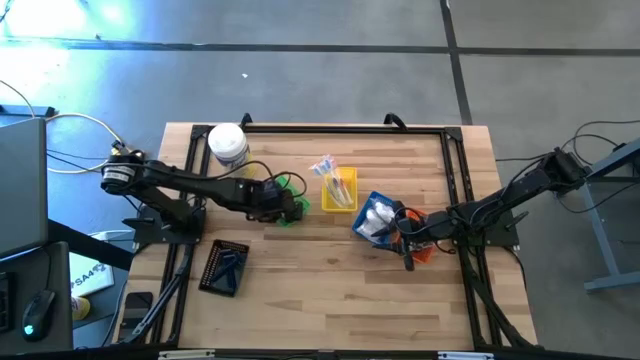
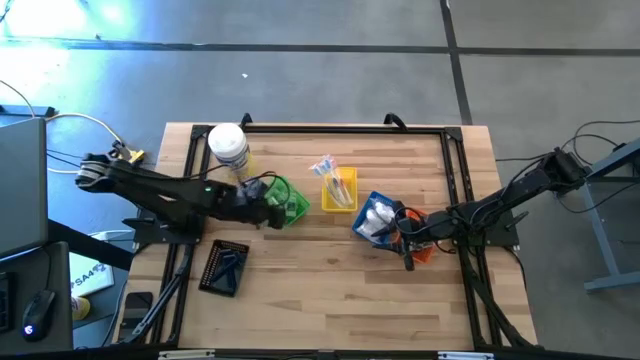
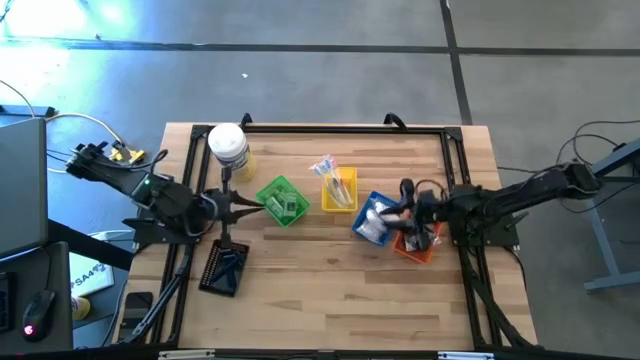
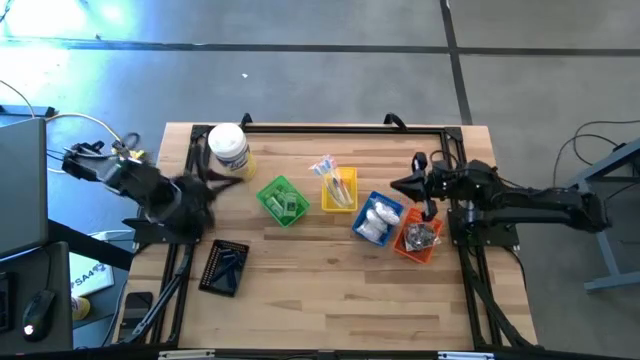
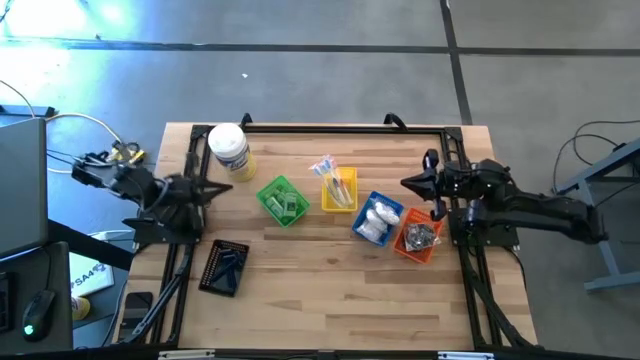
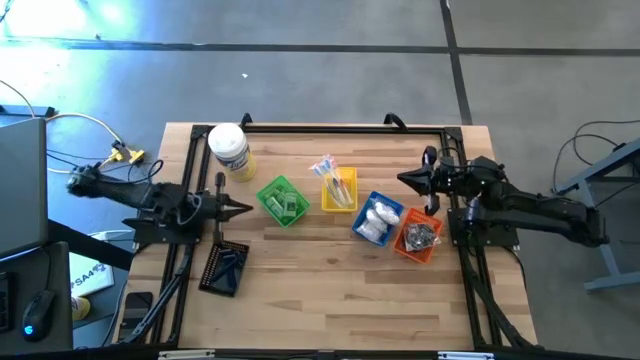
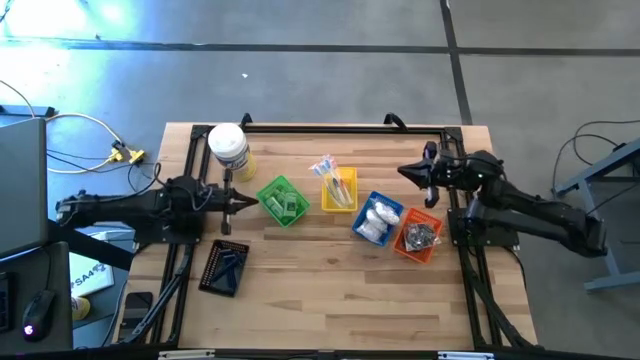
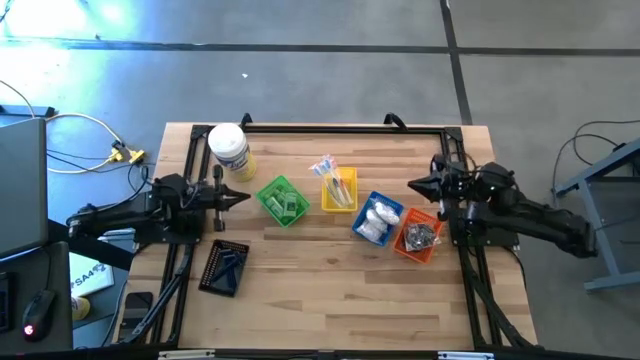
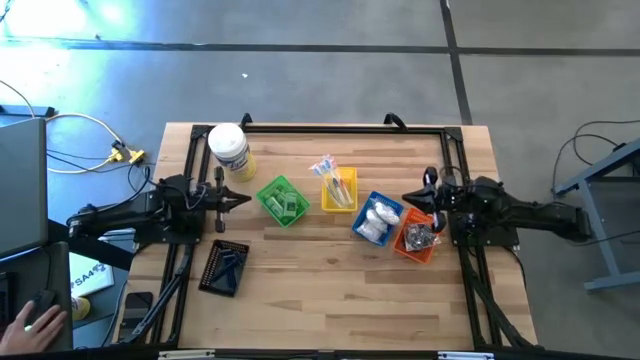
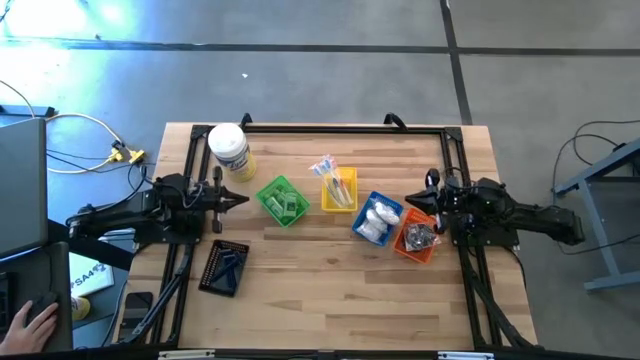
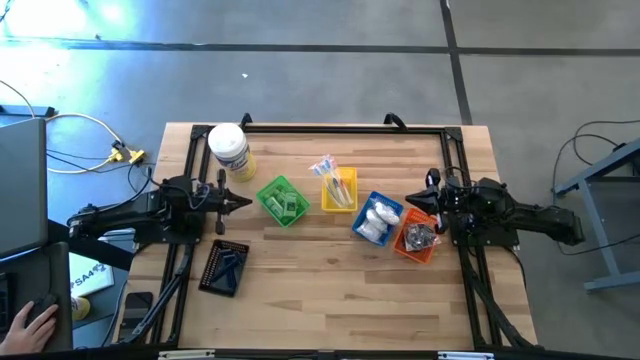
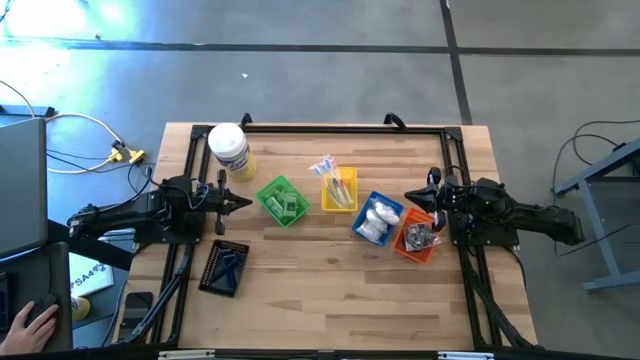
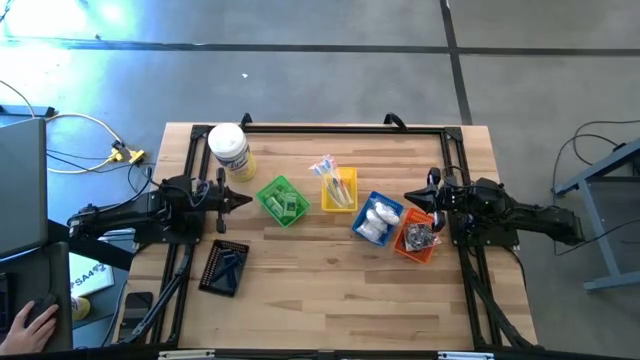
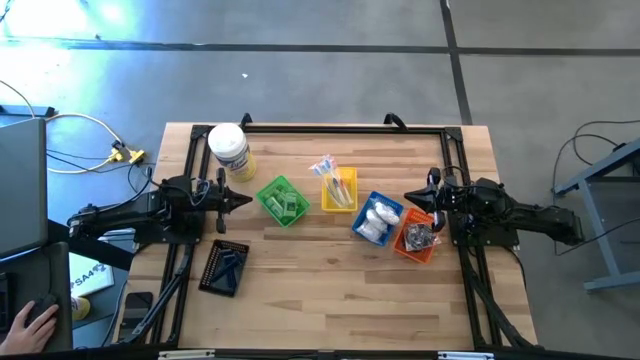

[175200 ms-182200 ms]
Task: Pick & Place Travel size toiletries
Return to Home Position

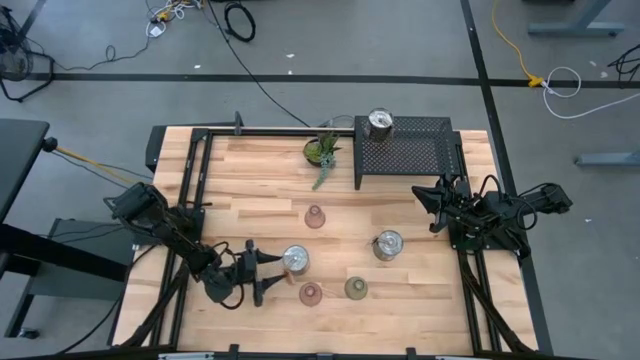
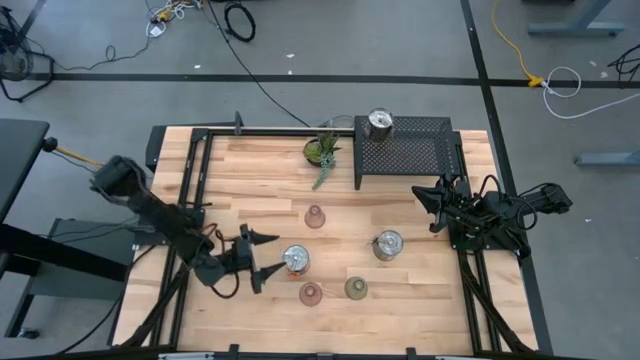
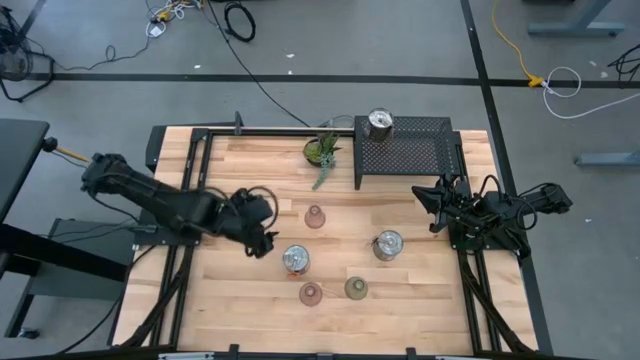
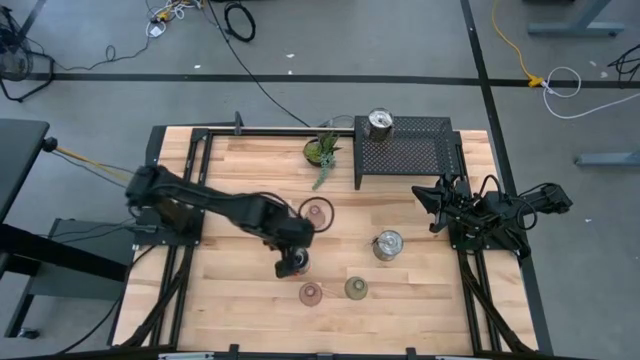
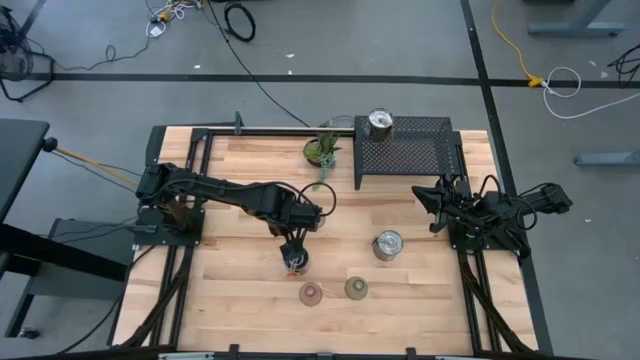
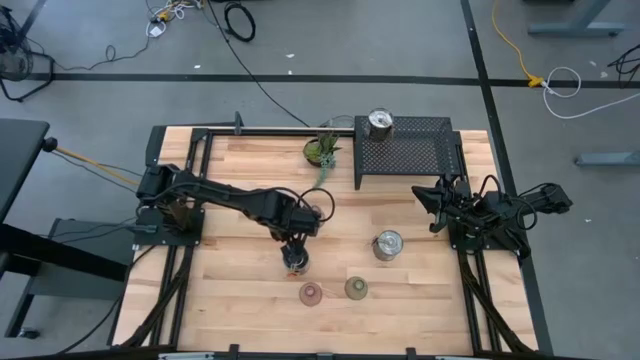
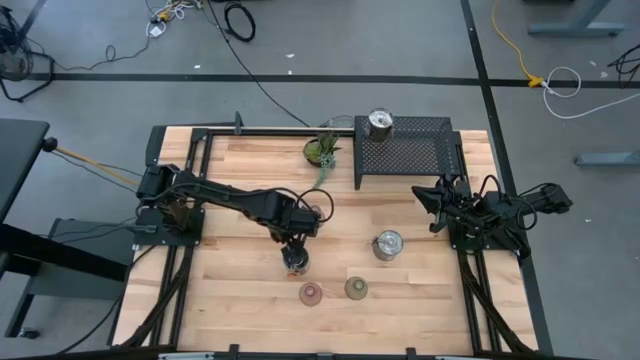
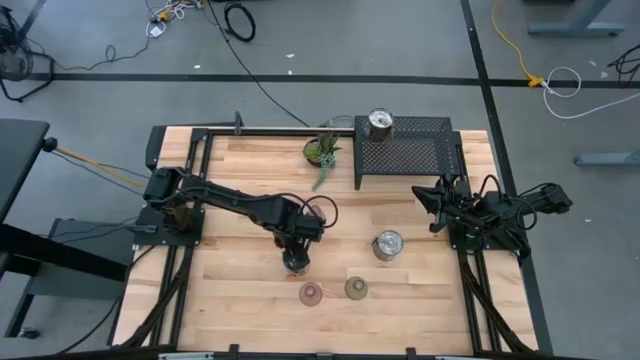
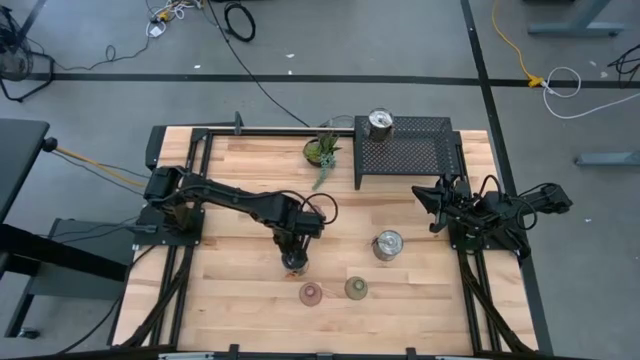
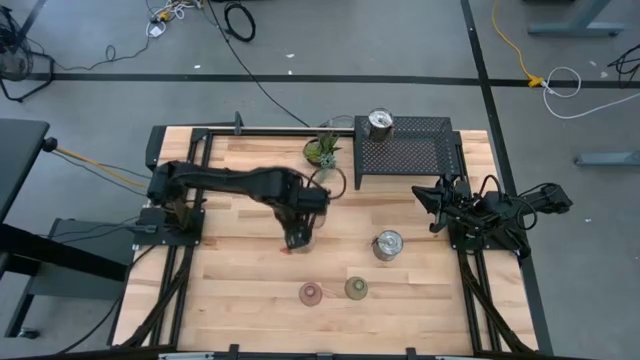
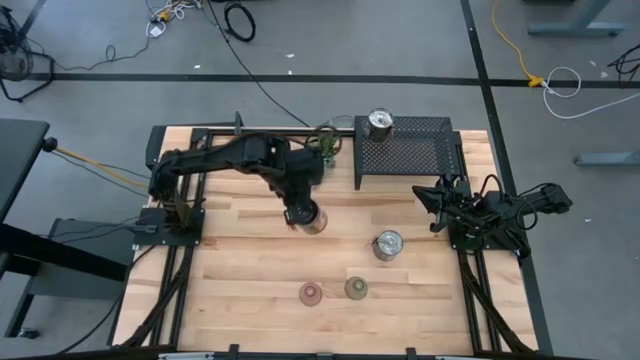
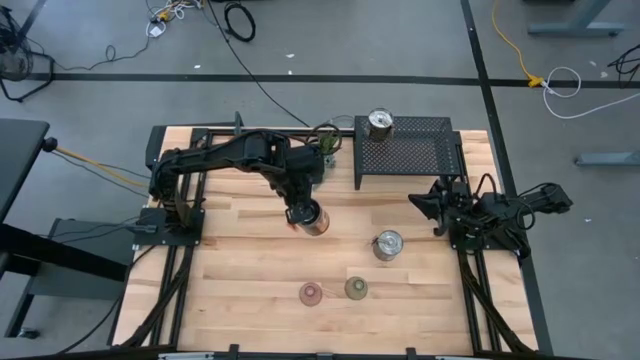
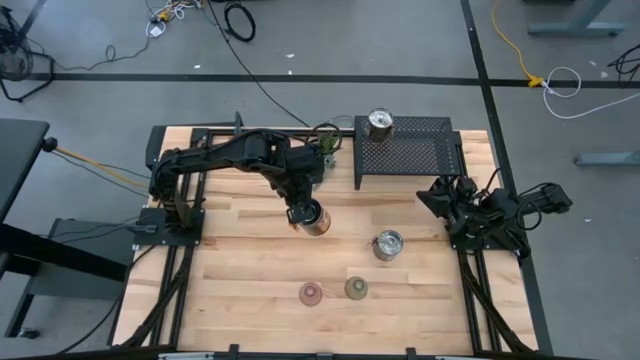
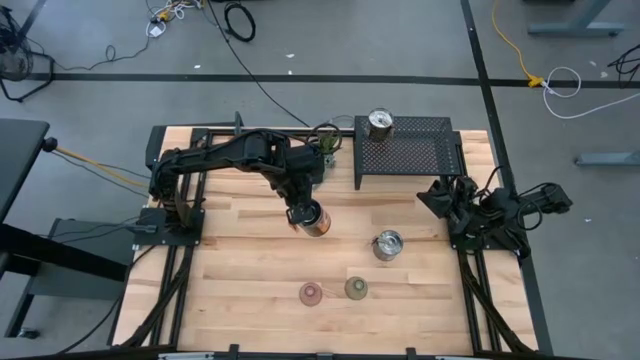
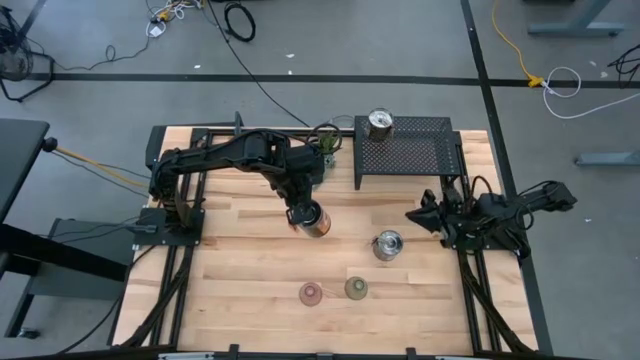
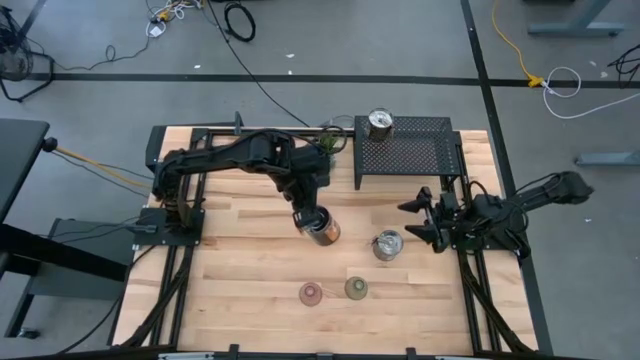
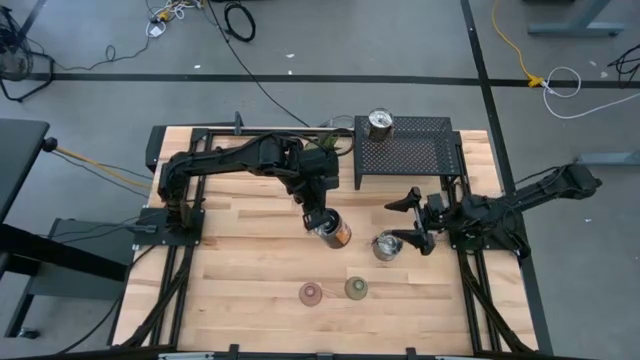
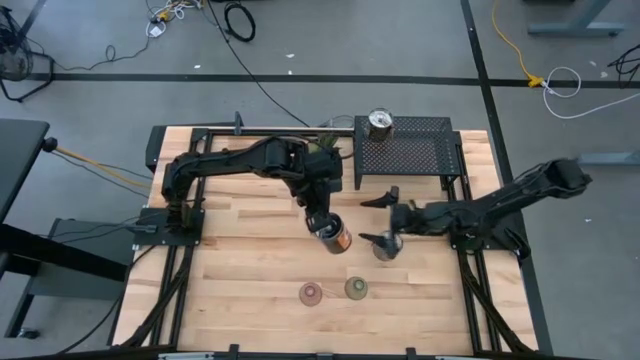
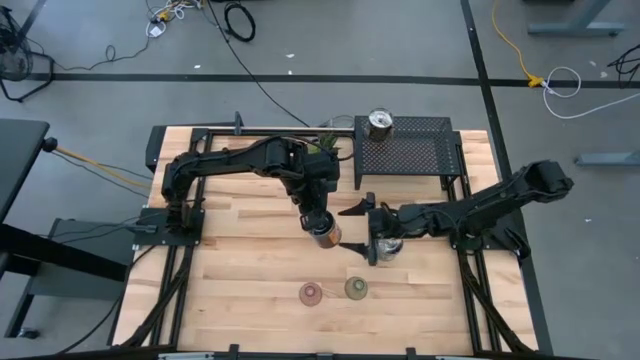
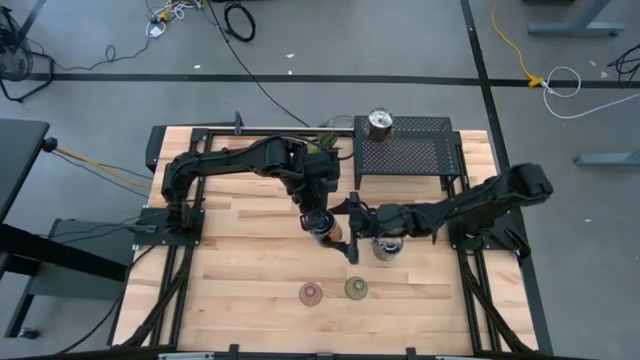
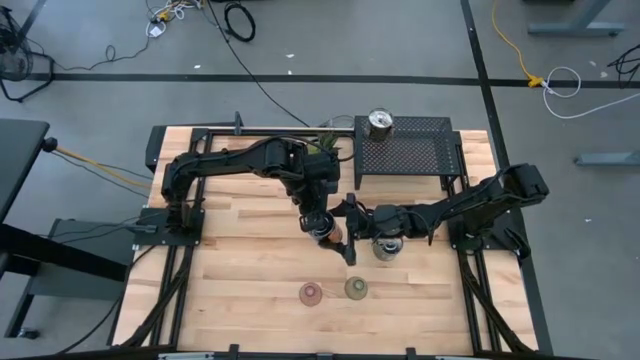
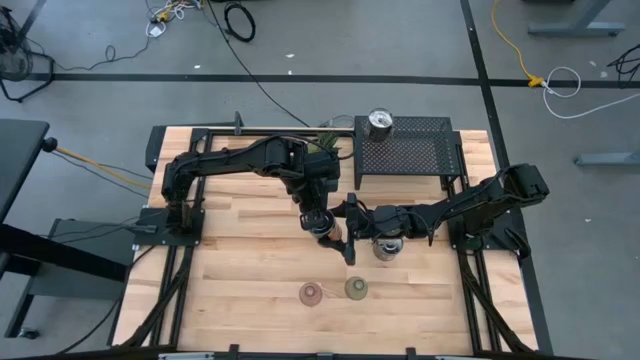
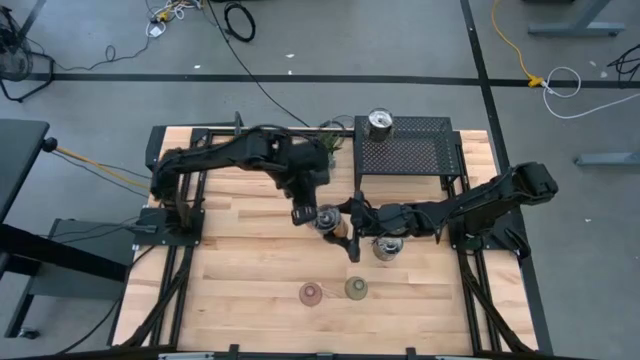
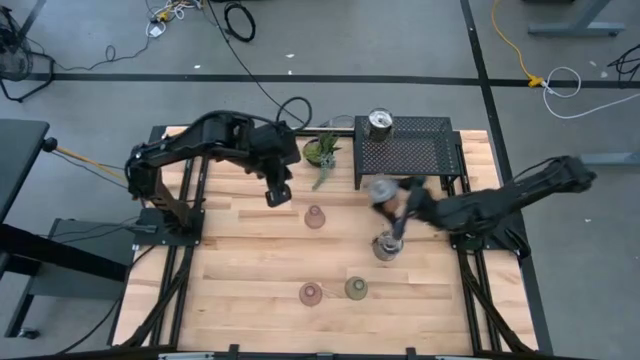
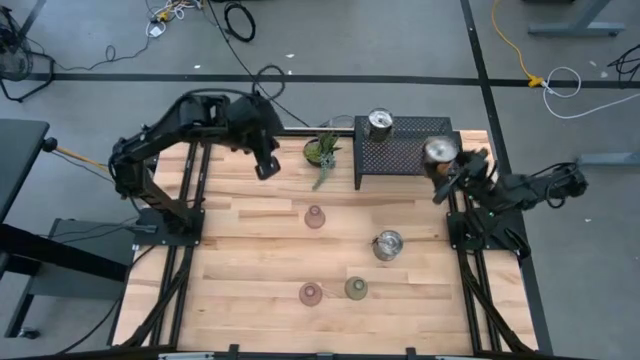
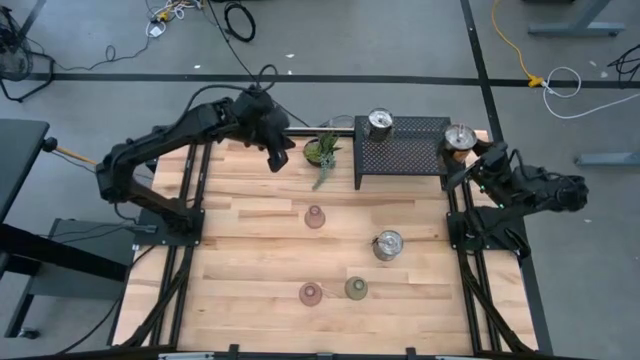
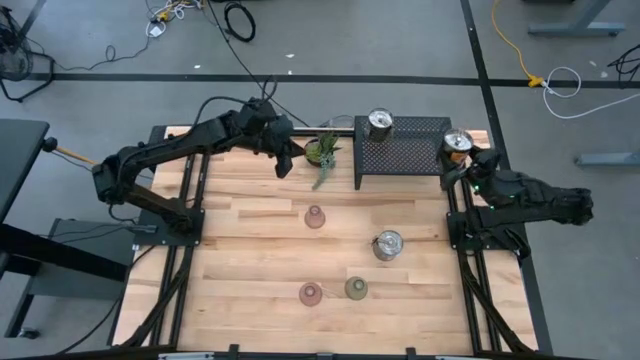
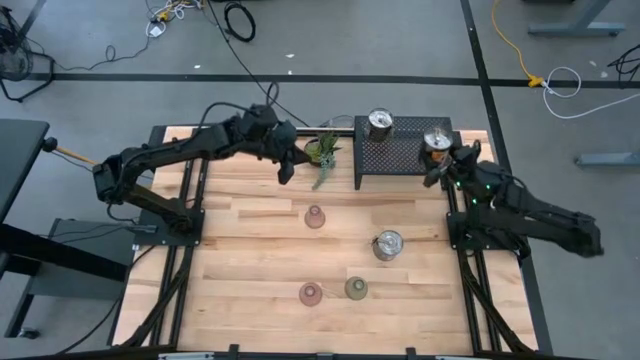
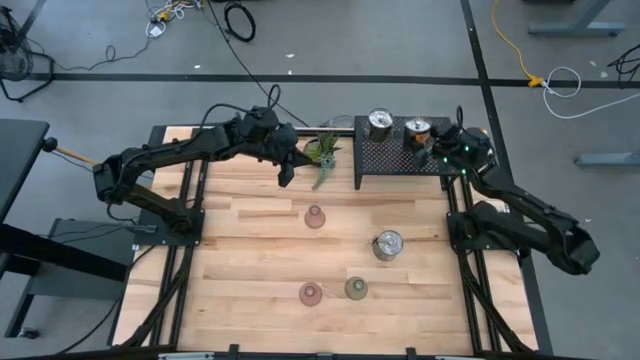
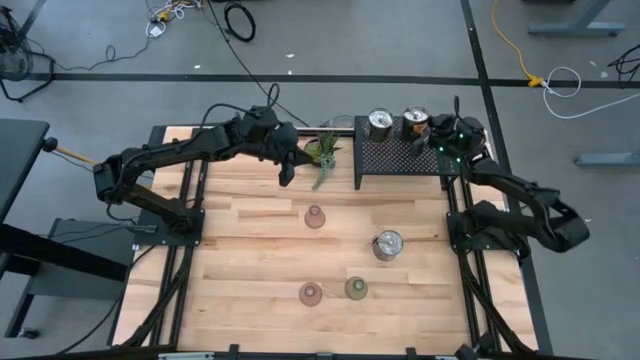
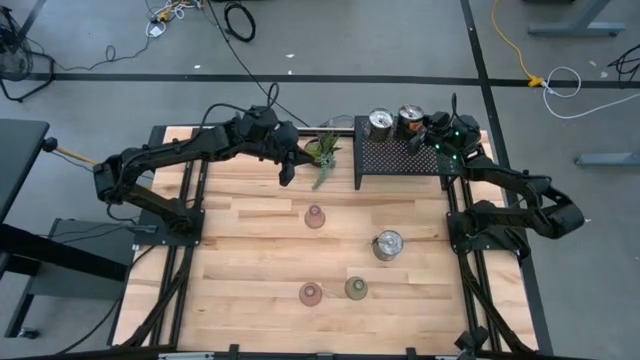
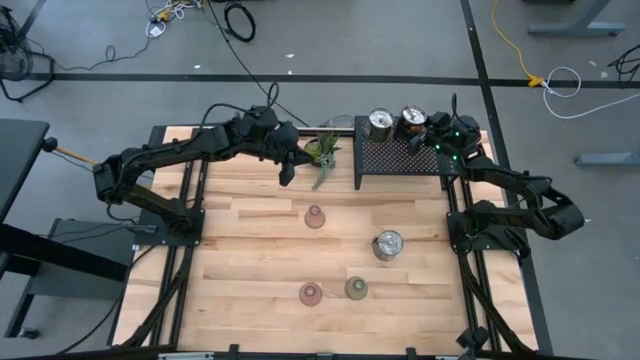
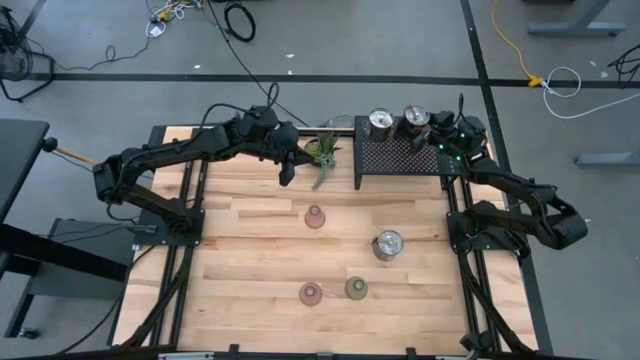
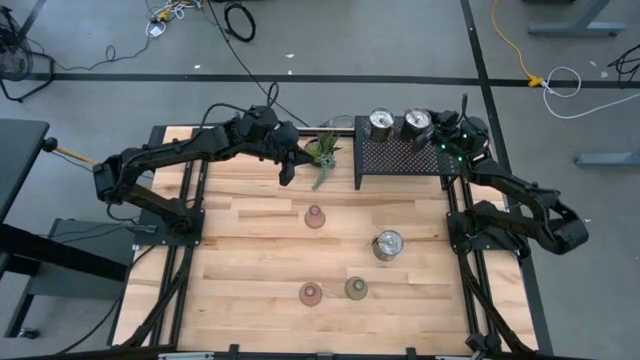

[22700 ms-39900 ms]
Task: Pick & Place candle stick holders
Align the left silver scented candle with the silver scented candle on the shelf
